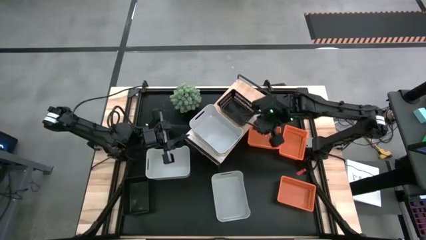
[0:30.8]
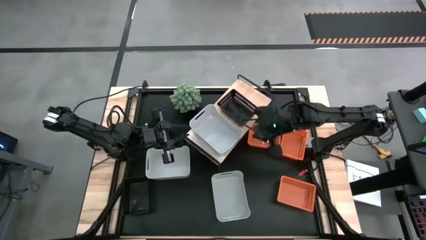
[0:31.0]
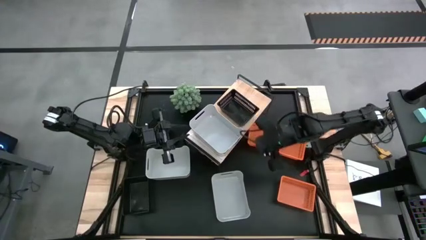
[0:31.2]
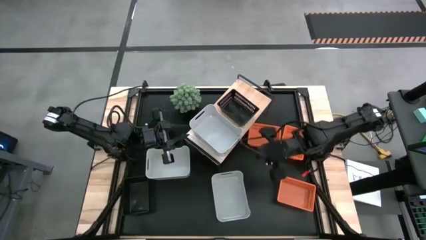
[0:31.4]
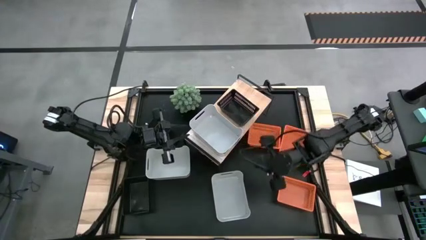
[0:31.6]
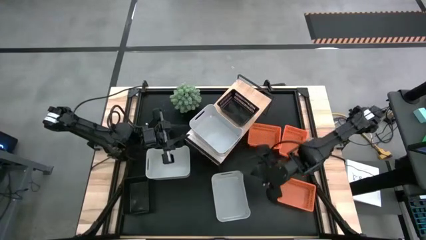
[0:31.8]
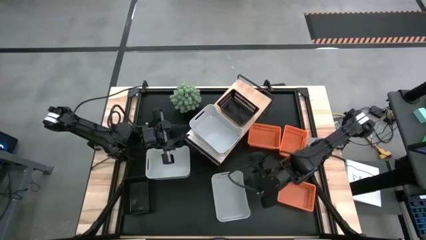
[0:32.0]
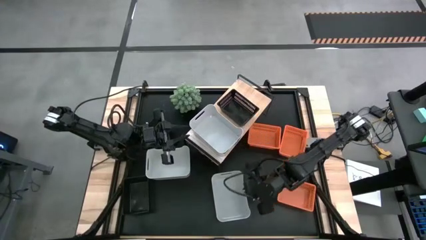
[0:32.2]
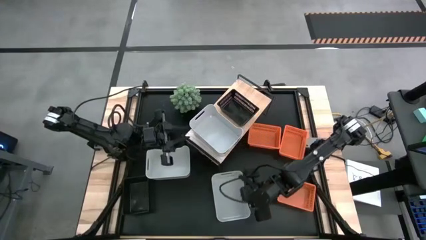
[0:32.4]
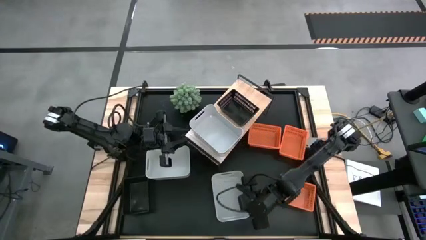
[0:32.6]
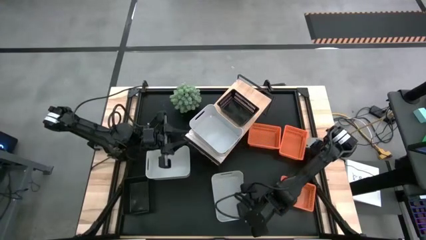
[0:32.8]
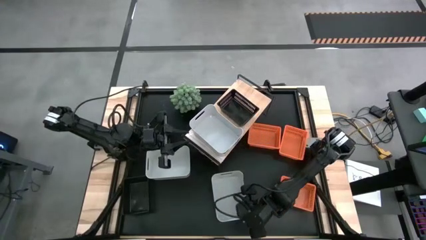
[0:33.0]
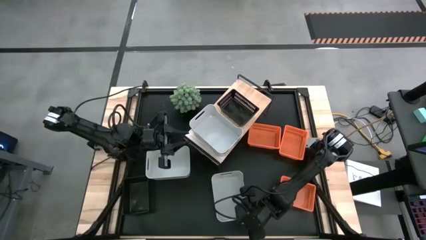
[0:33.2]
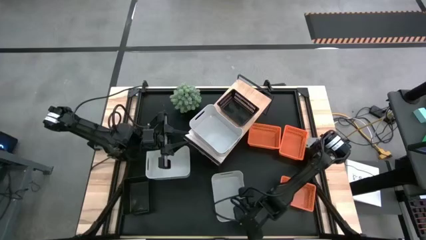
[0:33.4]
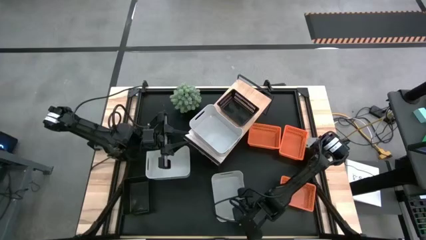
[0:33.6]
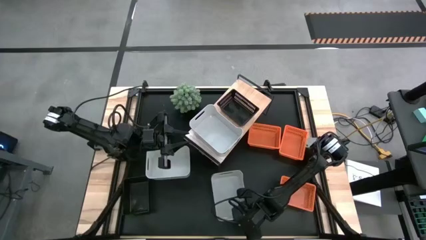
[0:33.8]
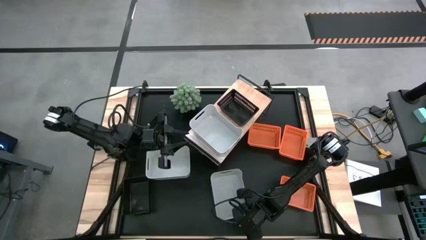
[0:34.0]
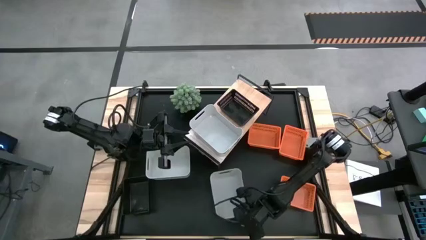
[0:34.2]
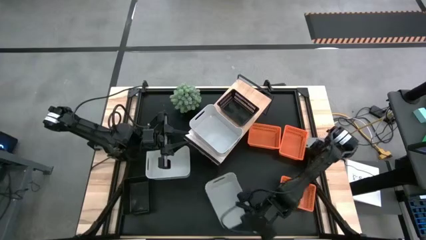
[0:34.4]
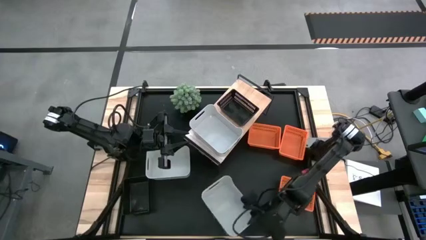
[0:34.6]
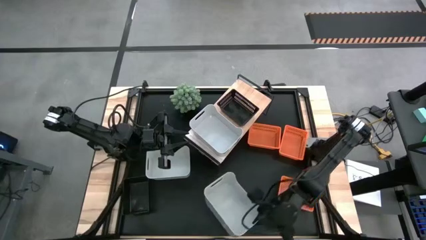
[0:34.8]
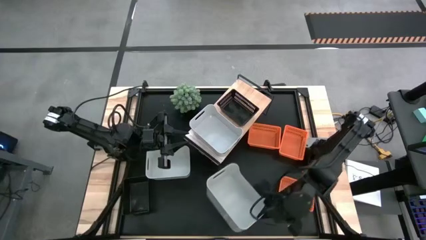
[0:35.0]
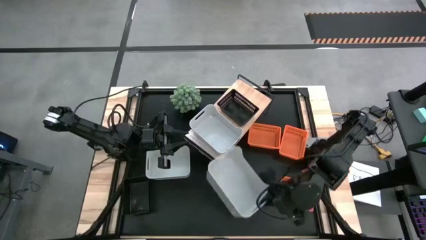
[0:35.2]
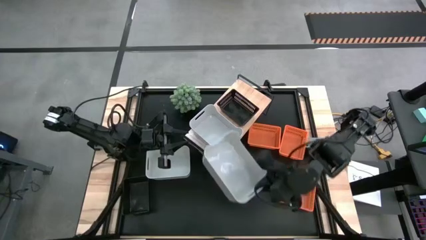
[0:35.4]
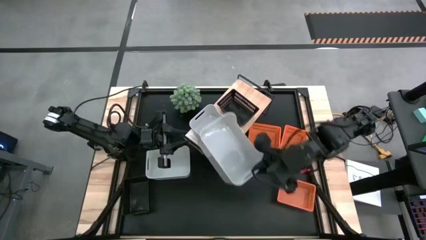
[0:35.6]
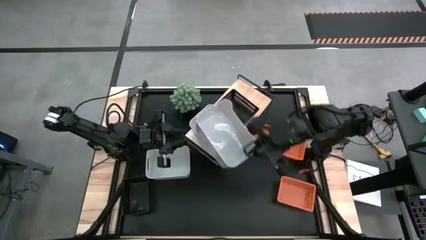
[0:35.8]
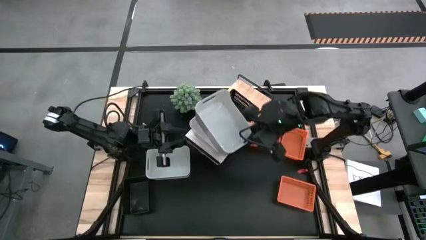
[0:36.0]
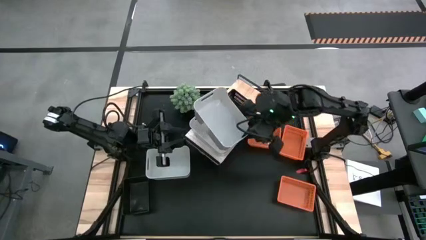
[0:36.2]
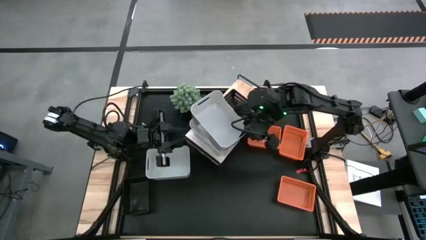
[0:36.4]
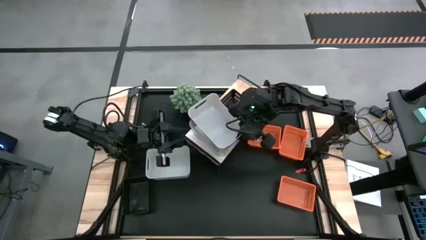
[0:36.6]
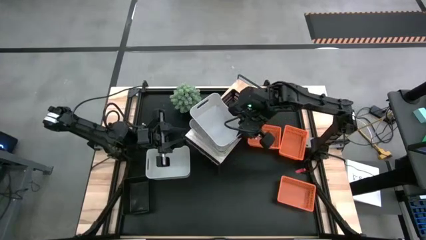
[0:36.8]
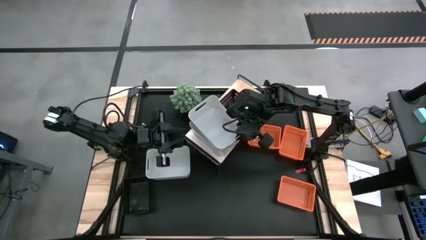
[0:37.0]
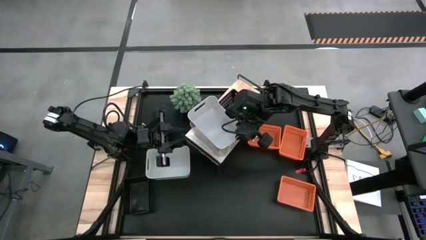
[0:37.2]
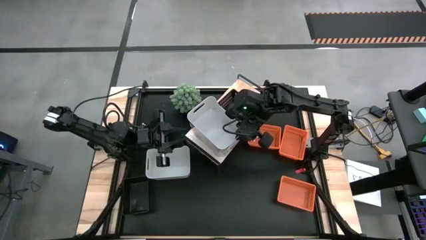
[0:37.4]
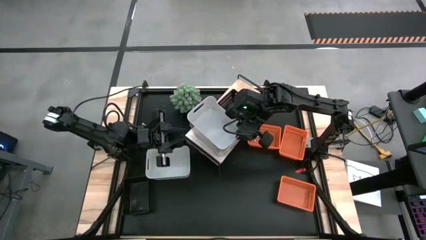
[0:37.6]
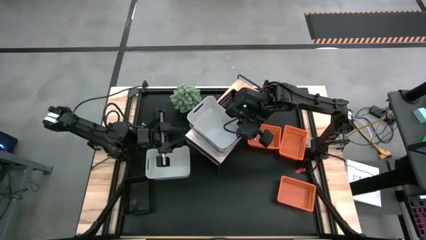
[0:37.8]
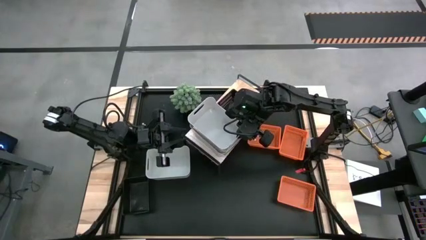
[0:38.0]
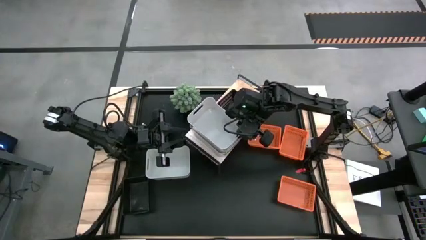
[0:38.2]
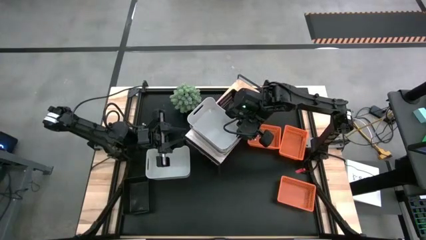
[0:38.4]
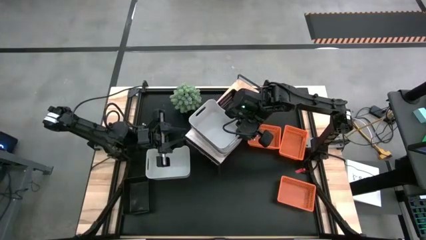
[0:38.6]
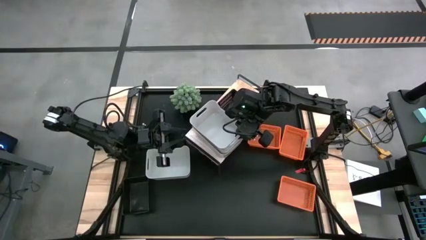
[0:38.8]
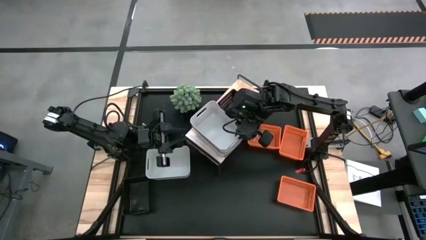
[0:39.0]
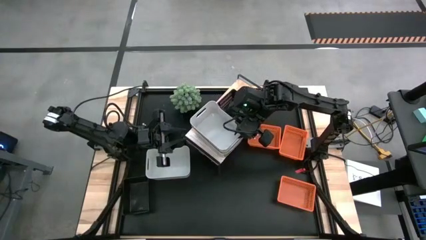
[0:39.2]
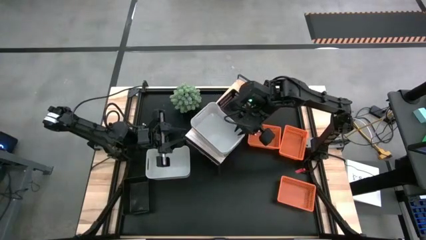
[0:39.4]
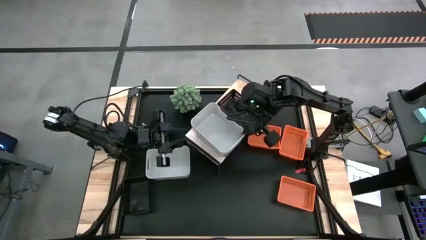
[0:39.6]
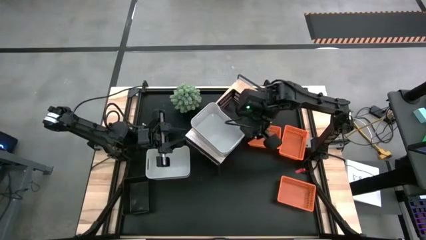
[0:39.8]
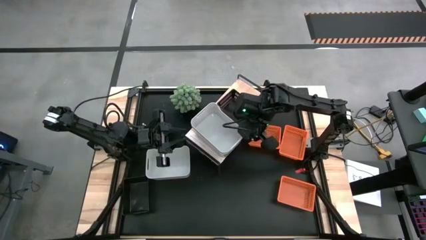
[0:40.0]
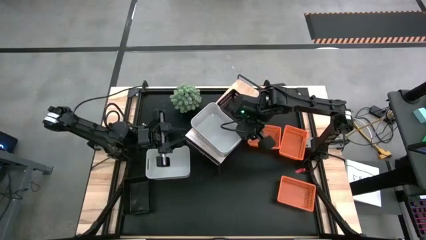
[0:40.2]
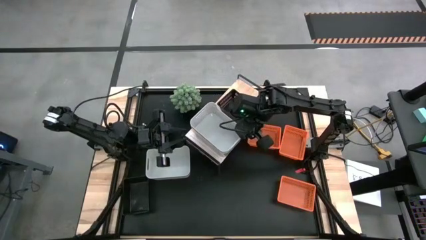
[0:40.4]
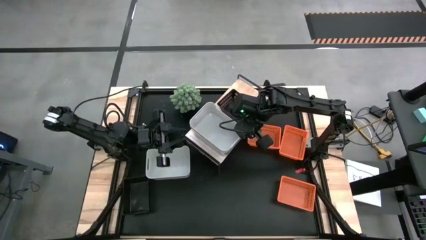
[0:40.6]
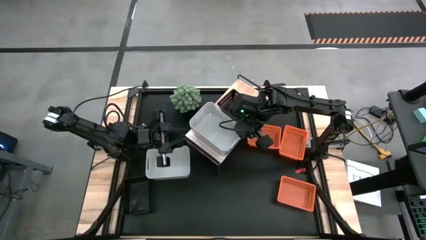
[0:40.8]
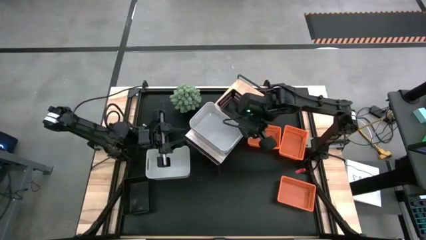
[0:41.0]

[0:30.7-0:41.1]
Task: Stack baskets on shelf by color
Stack the right gray bin on top of the other gray bin on the shelf

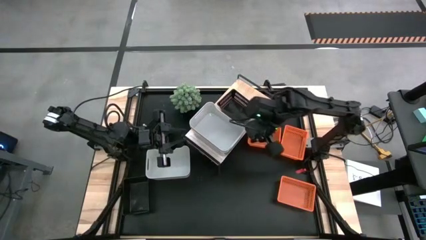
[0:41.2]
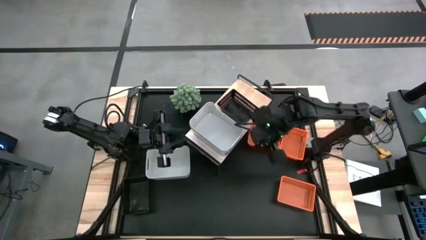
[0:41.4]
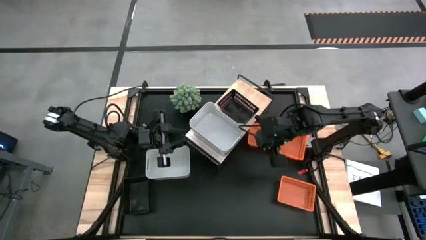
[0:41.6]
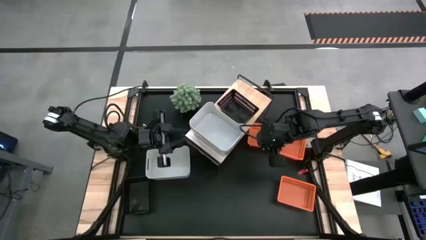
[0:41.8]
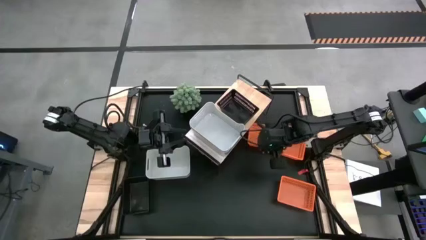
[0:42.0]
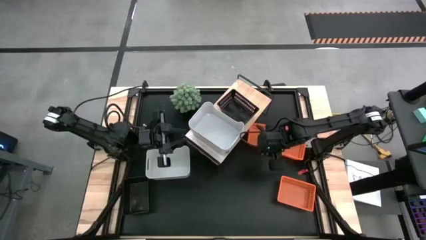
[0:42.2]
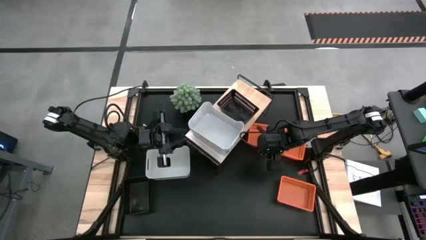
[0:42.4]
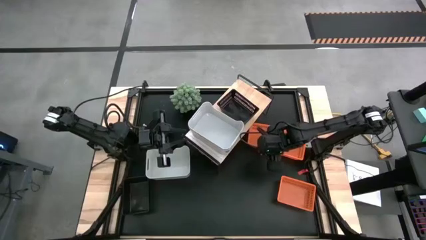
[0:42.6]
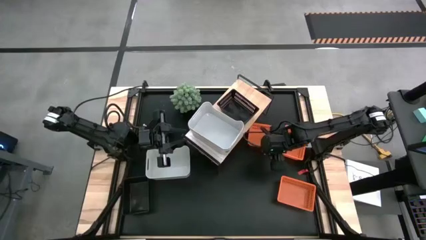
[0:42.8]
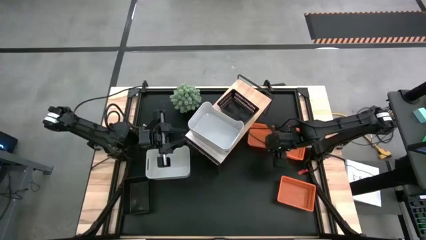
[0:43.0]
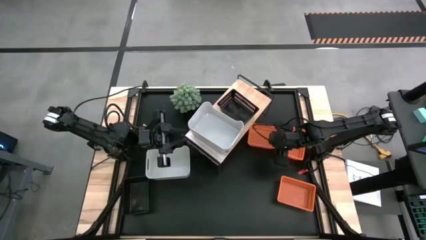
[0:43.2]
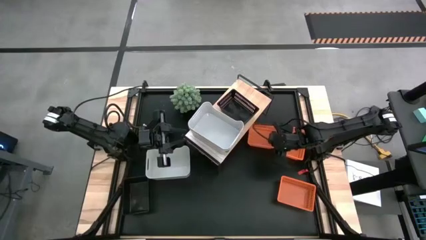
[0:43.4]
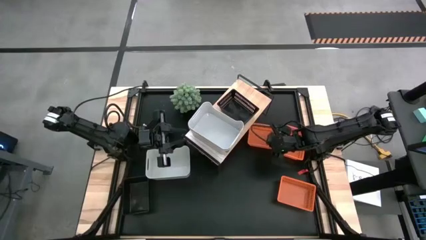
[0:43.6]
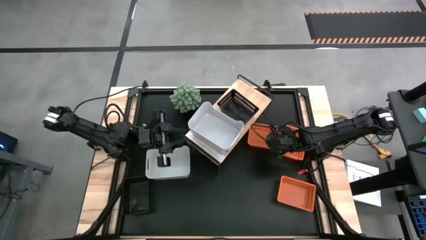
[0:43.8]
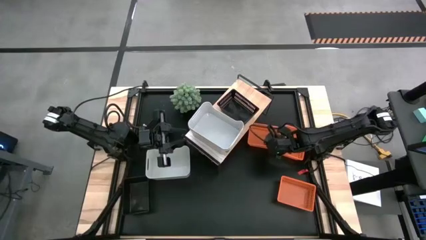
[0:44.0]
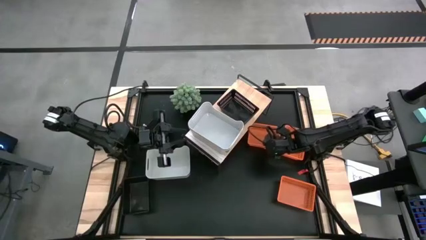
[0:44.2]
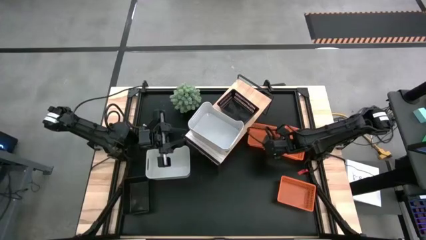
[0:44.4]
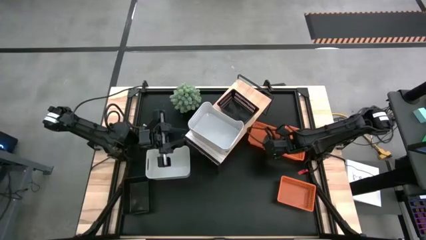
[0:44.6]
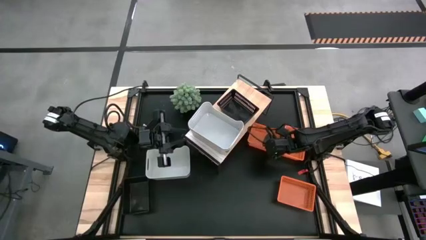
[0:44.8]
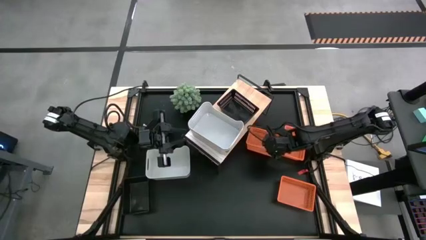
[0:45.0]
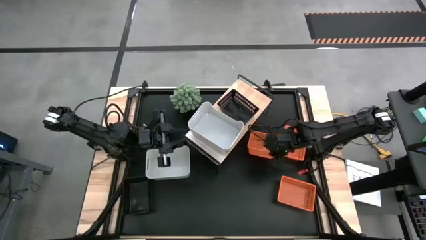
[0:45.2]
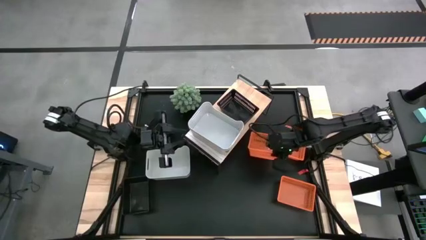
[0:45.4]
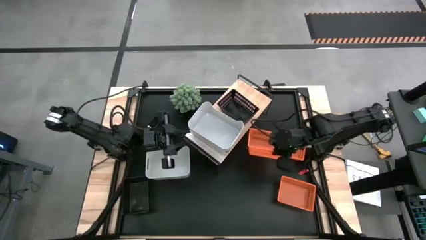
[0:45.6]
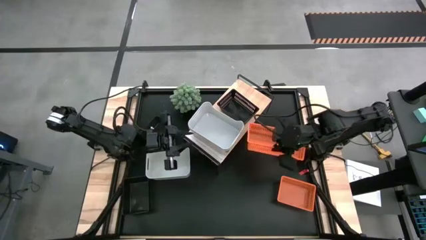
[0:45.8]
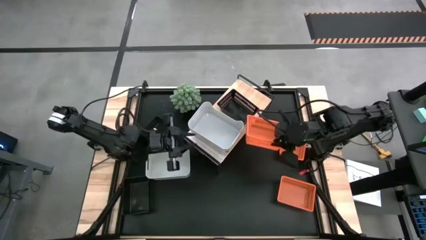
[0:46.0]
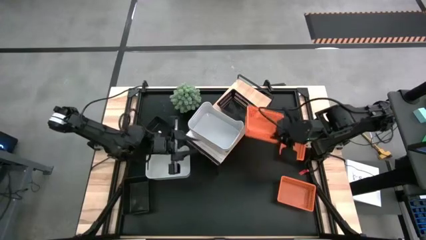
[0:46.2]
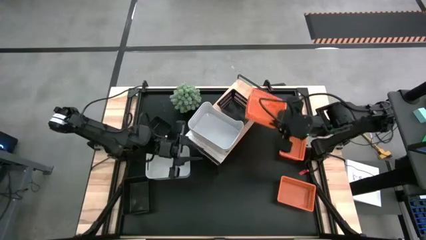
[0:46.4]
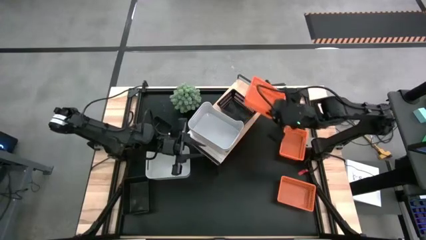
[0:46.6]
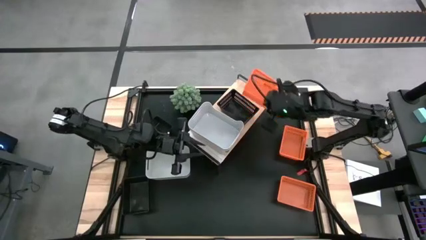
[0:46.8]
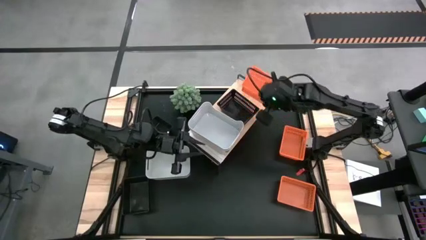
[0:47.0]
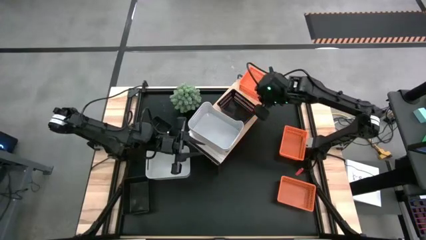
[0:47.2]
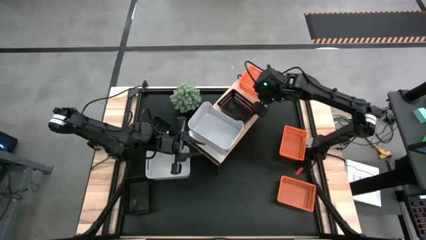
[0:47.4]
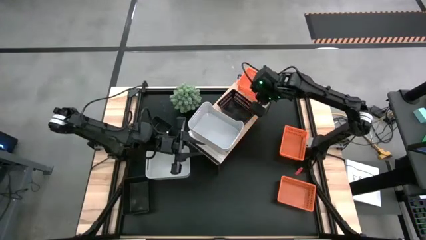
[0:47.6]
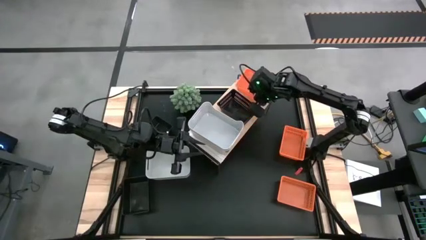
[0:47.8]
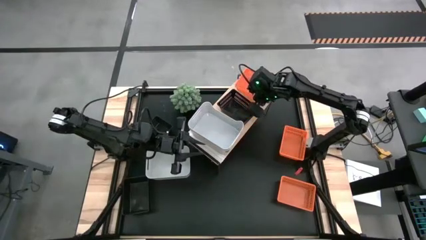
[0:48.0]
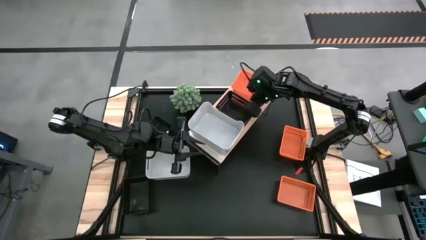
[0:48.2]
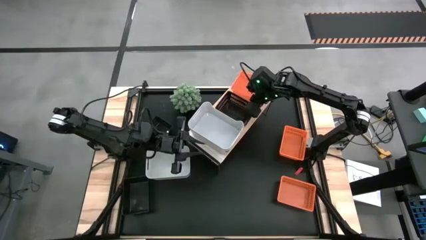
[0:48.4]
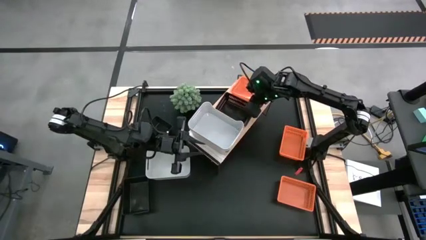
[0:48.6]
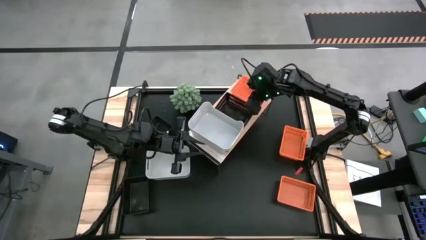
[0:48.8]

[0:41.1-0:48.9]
Put the top left orange bin on the shelf
